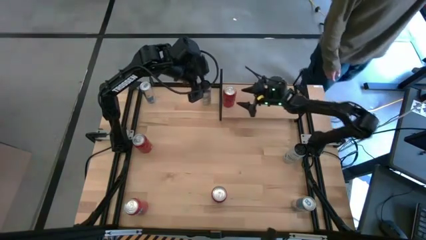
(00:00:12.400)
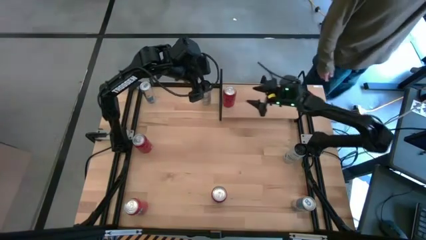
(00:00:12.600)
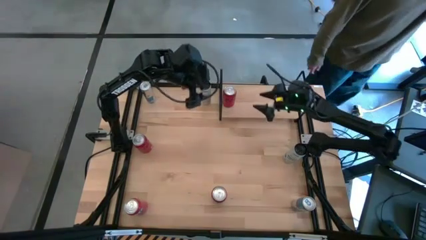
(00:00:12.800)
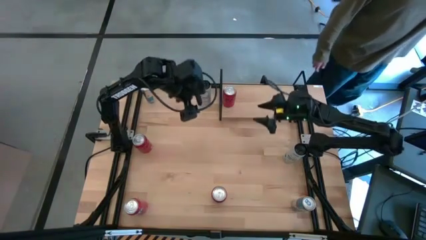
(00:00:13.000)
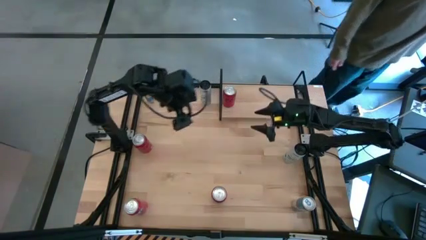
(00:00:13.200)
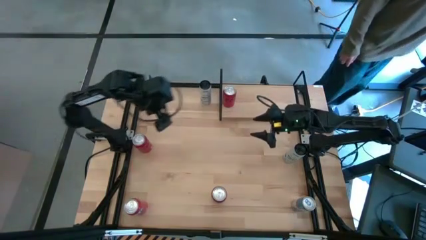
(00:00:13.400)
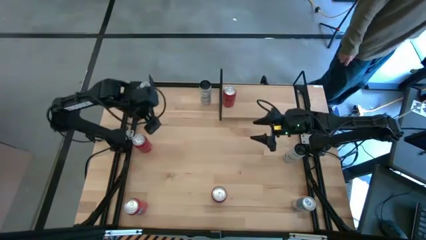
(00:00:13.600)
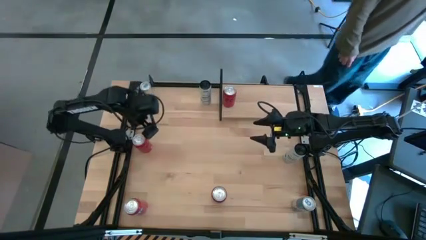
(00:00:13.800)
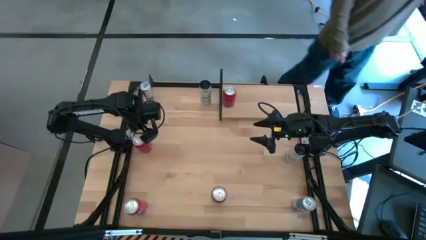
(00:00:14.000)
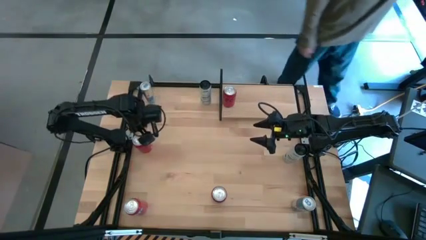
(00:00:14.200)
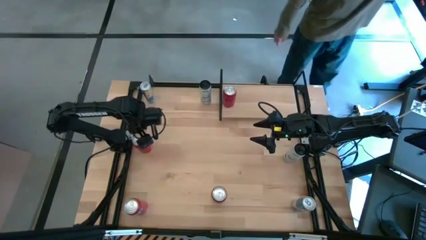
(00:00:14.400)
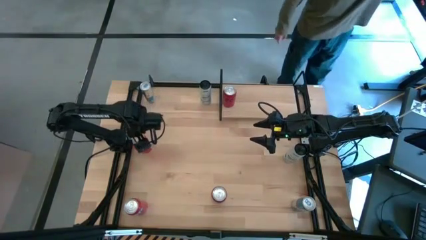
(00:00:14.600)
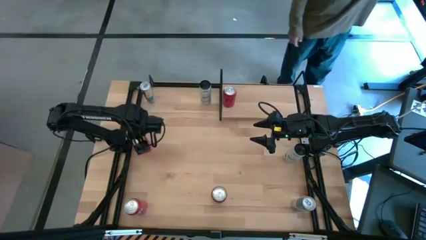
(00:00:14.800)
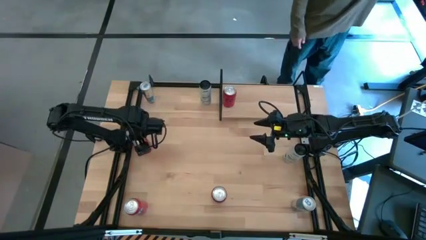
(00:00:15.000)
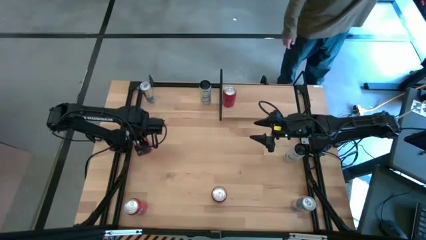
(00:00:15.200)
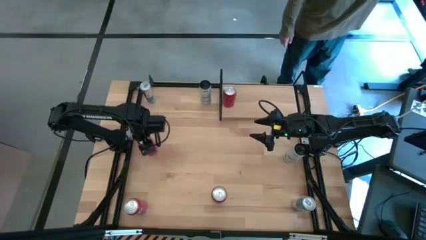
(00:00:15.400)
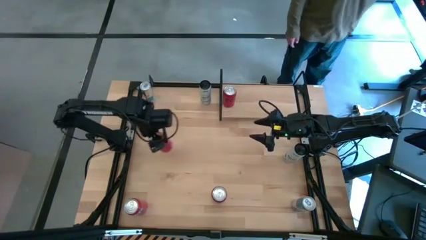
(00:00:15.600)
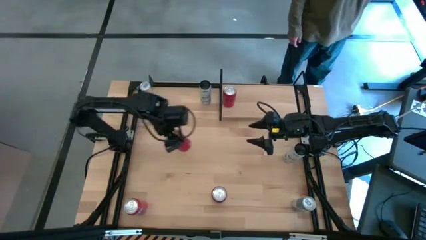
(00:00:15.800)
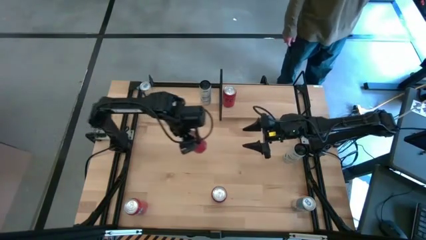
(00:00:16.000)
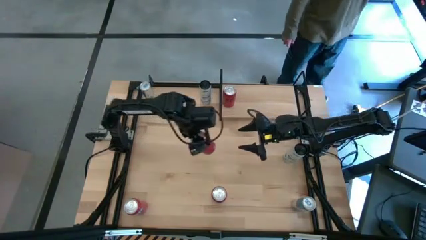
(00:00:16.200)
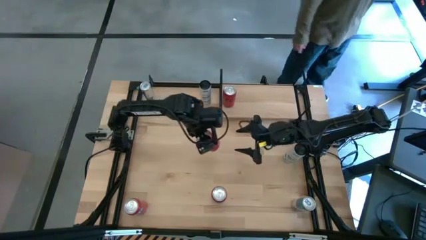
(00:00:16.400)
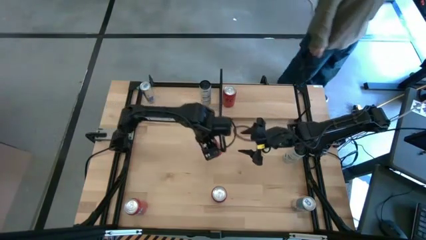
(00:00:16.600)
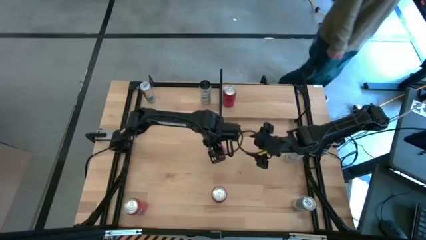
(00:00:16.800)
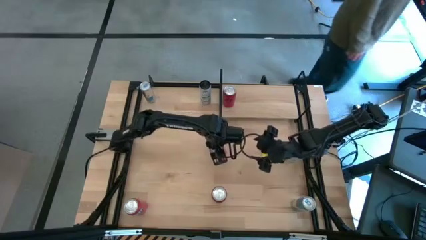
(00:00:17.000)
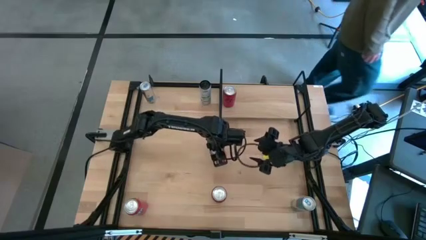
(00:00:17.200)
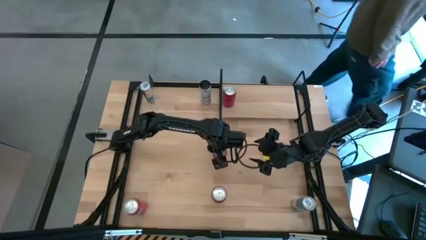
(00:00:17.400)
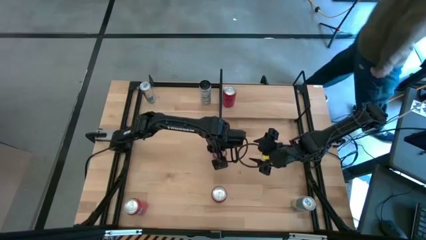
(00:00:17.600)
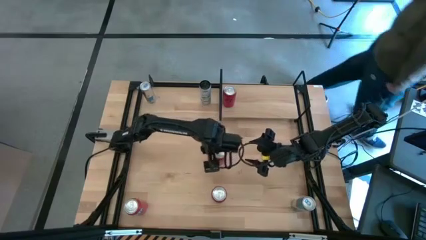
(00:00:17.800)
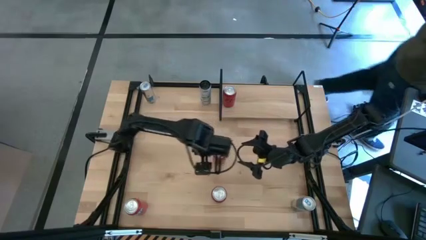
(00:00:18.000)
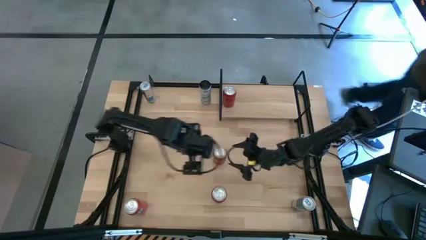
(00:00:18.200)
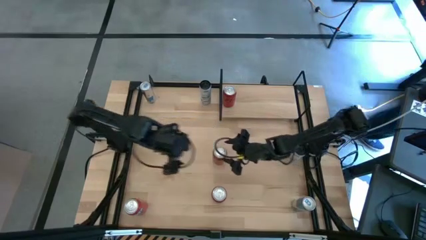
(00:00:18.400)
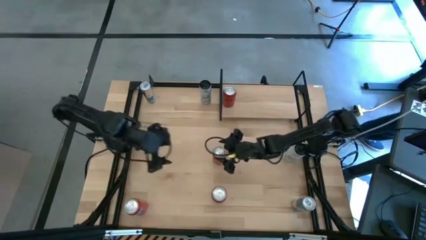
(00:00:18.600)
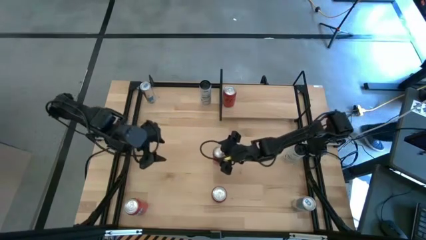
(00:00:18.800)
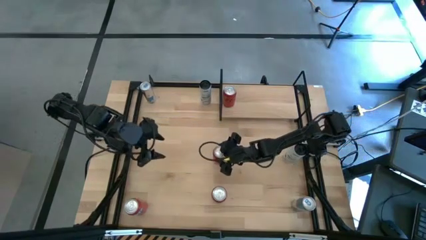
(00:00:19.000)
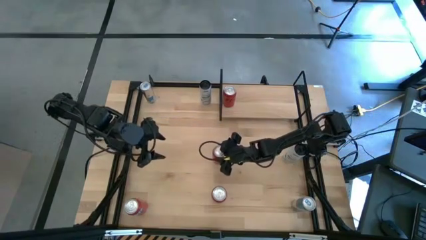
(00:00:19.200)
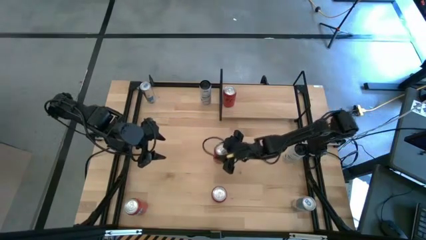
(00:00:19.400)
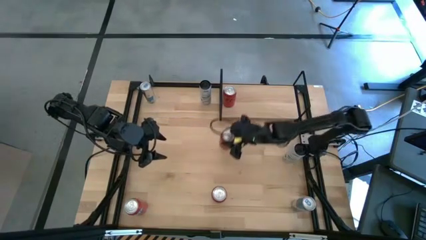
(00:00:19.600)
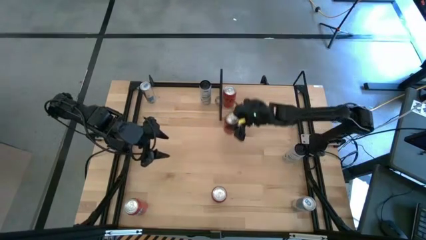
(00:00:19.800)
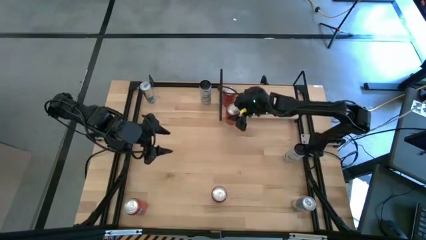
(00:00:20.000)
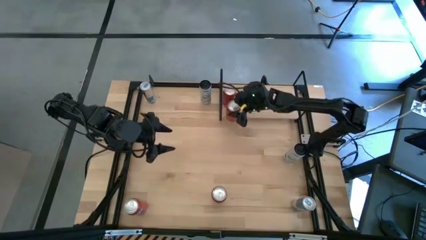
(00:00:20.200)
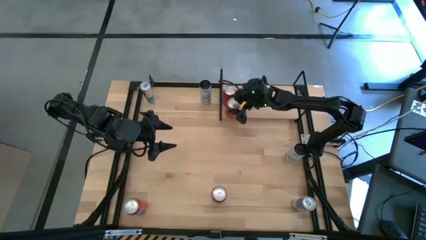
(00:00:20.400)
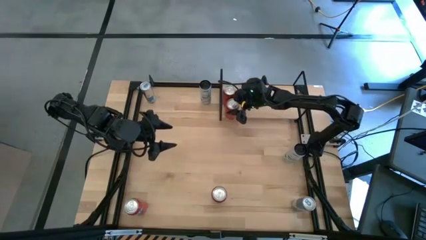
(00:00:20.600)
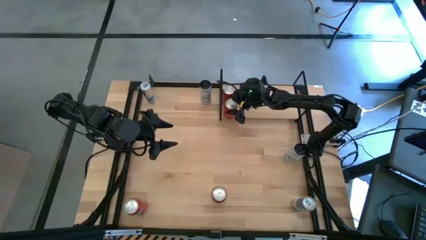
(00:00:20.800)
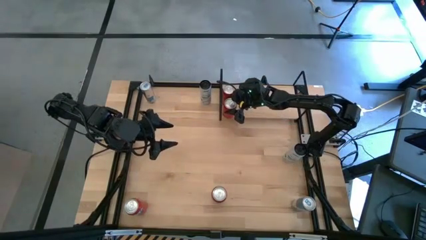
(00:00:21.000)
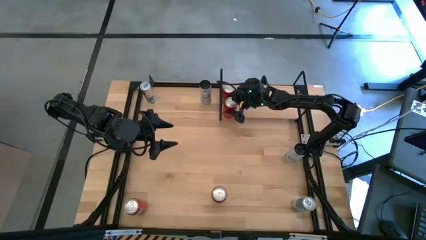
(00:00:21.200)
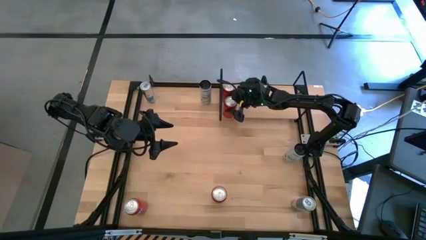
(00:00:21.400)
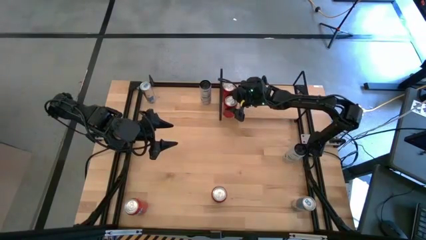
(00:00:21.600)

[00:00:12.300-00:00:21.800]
Task: Place canned beverage on shelf
Put the red-black soda can on the shelf aligned with other red-black soda can

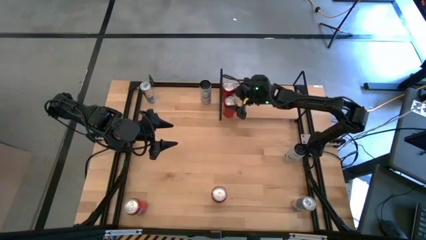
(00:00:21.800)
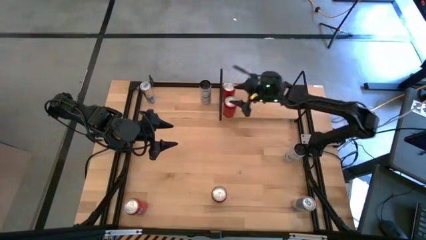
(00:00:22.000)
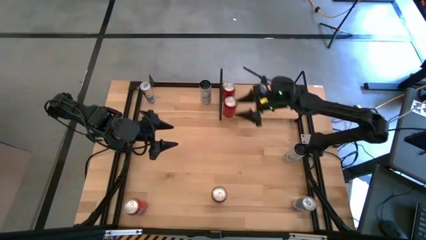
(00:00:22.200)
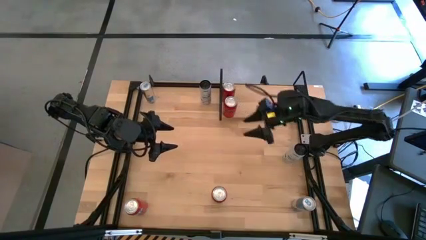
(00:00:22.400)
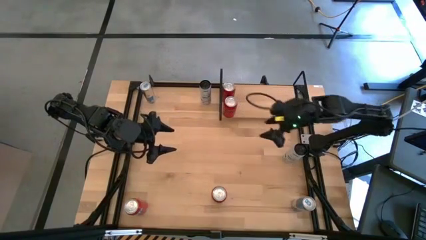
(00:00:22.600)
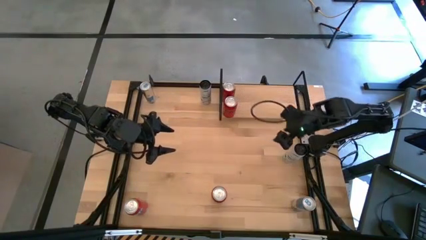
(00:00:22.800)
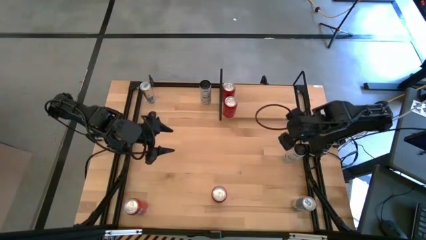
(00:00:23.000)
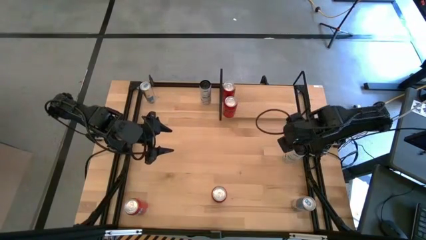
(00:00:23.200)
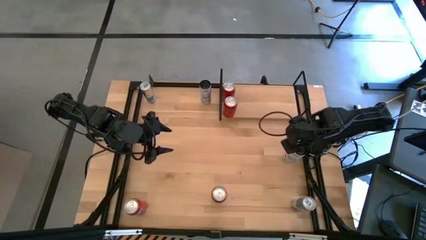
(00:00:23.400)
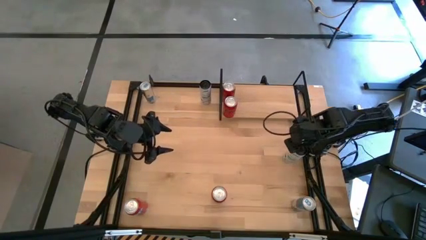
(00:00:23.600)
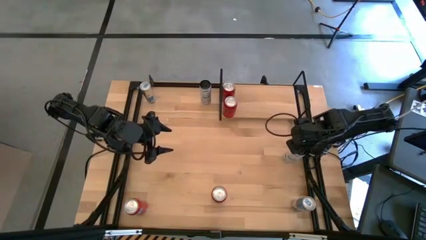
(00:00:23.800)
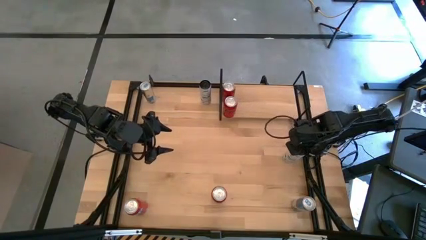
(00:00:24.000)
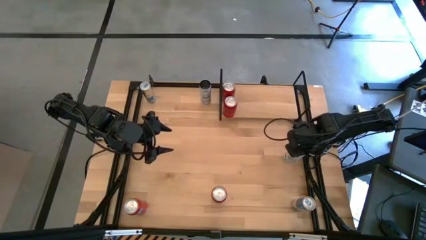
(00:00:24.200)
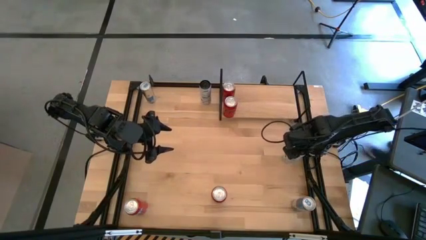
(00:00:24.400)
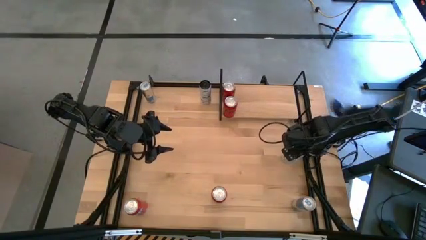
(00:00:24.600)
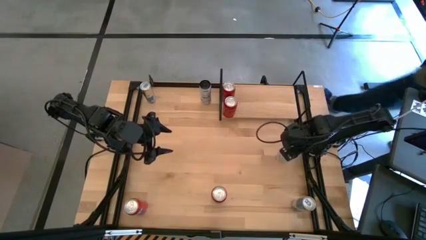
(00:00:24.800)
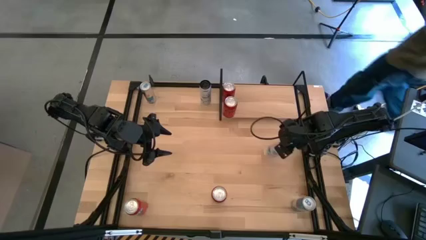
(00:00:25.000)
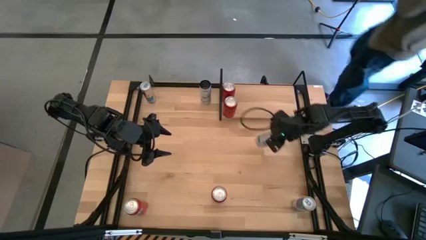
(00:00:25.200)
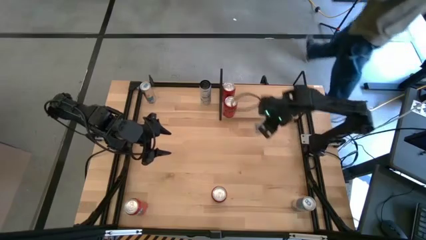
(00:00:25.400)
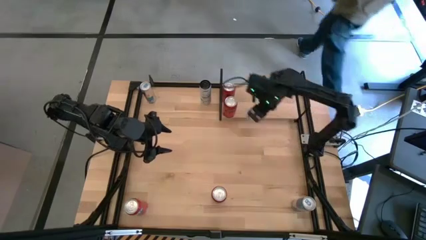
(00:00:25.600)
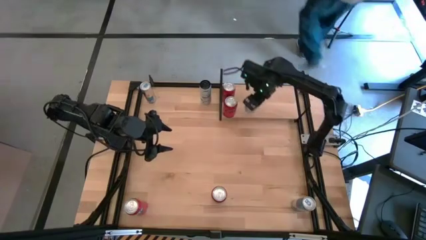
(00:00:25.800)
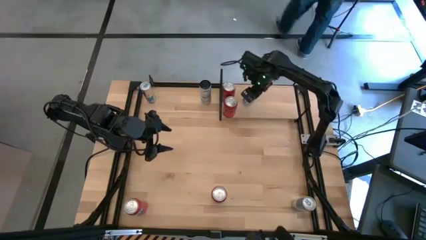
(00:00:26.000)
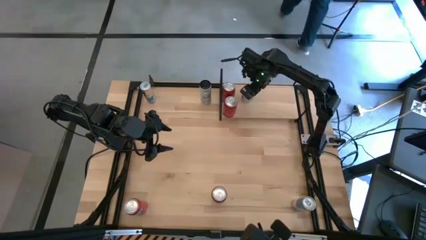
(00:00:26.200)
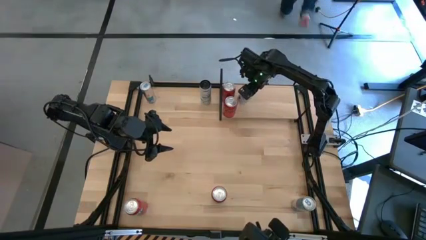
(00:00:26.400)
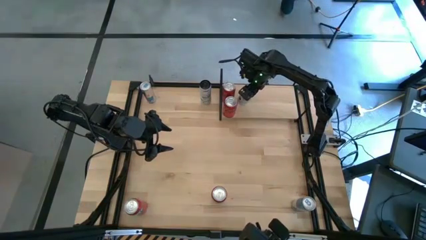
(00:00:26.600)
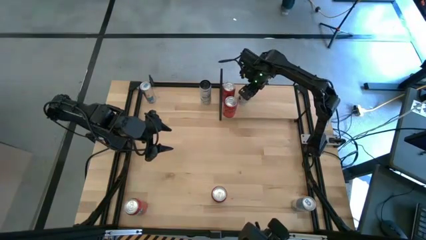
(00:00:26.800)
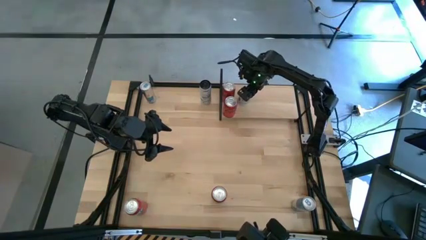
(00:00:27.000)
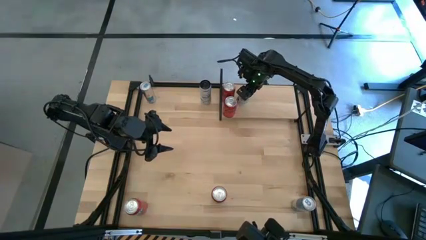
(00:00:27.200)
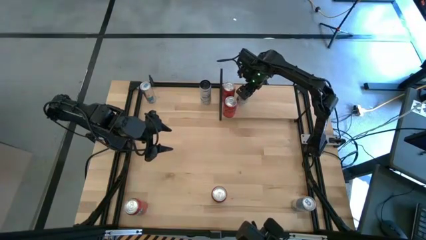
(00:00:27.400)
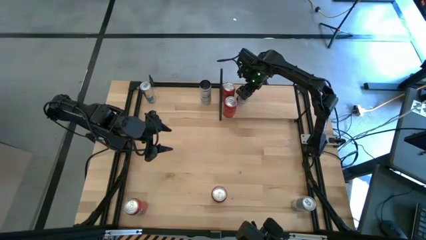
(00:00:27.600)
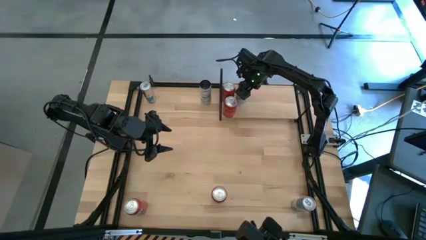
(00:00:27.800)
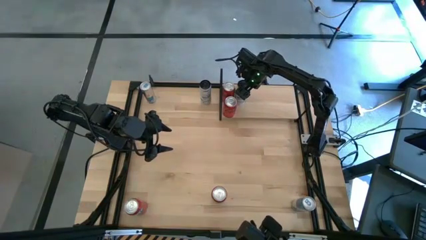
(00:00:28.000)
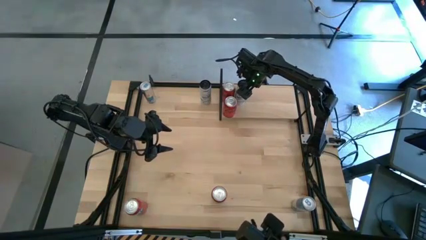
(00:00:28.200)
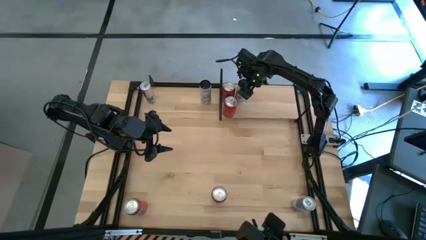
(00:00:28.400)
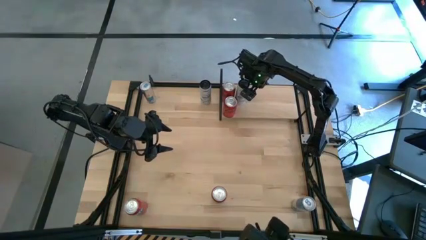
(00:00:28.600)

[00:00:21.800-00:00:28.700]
Put the bottom white-blue soda can on the shelf
